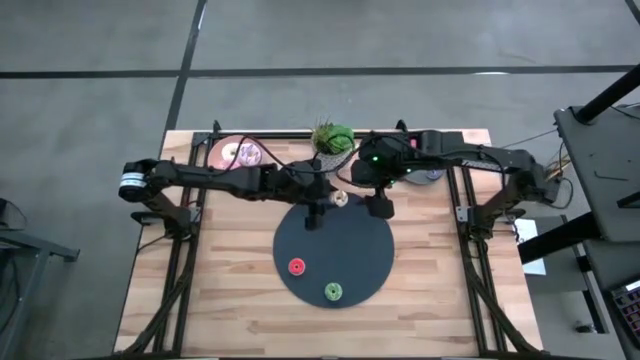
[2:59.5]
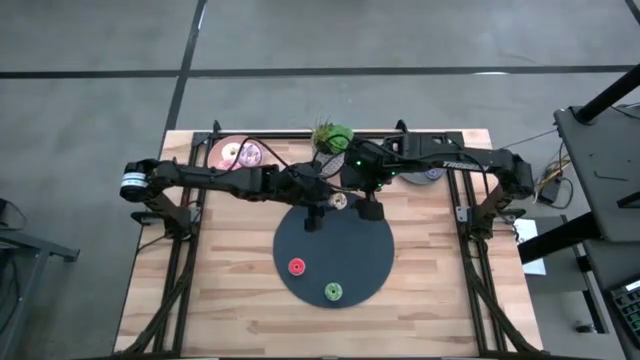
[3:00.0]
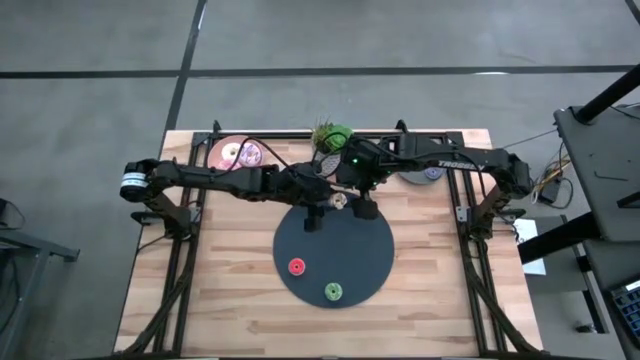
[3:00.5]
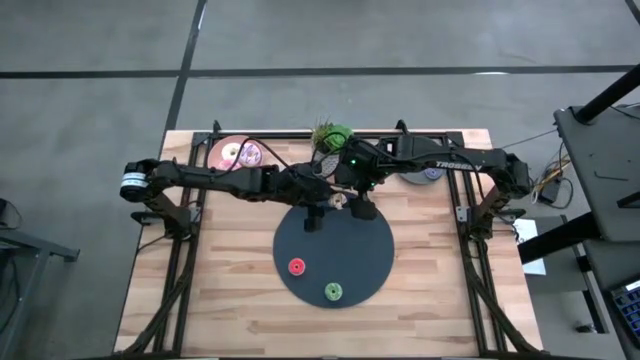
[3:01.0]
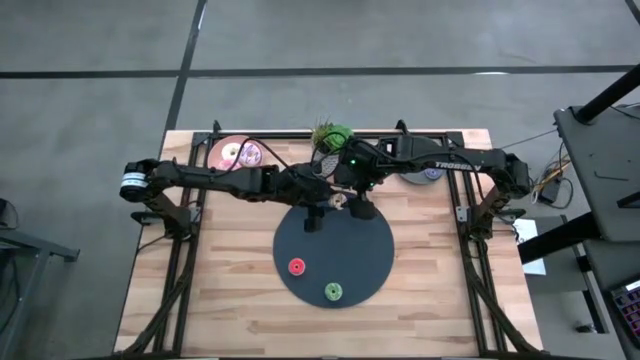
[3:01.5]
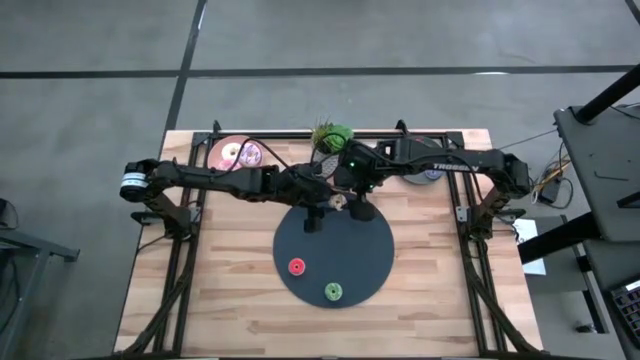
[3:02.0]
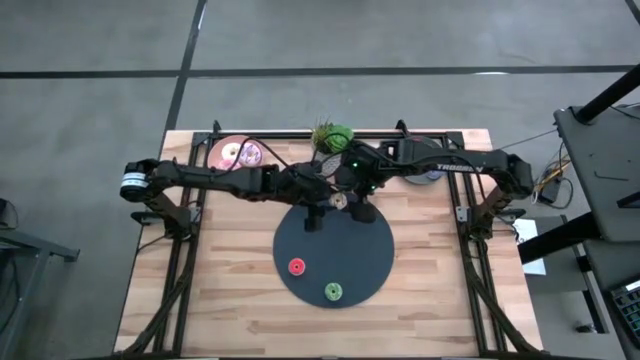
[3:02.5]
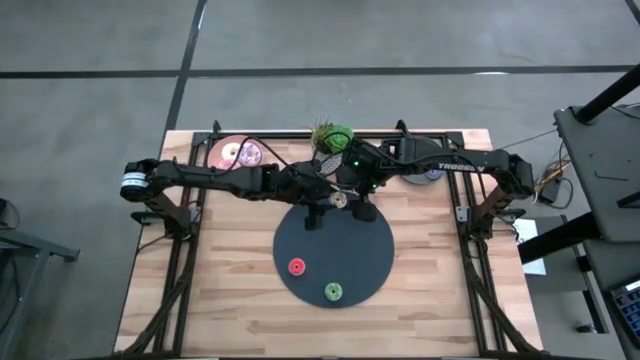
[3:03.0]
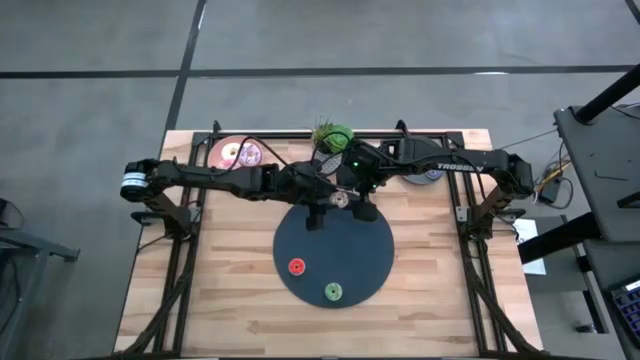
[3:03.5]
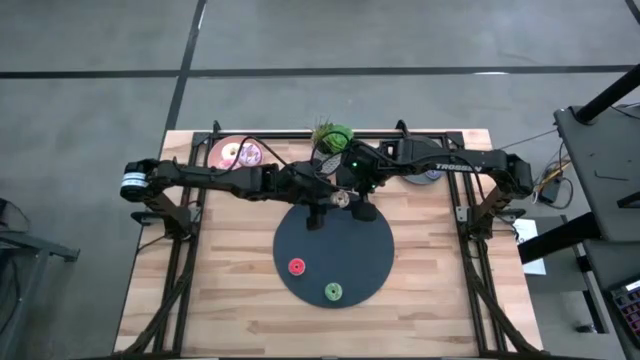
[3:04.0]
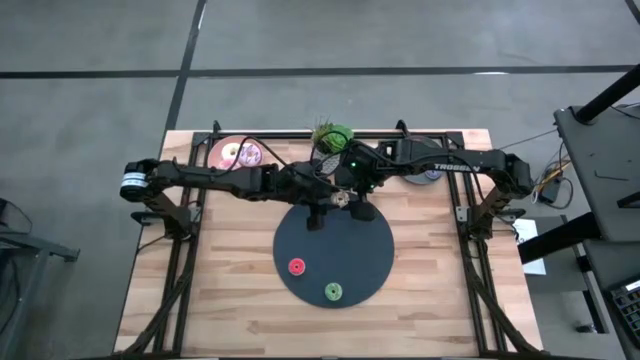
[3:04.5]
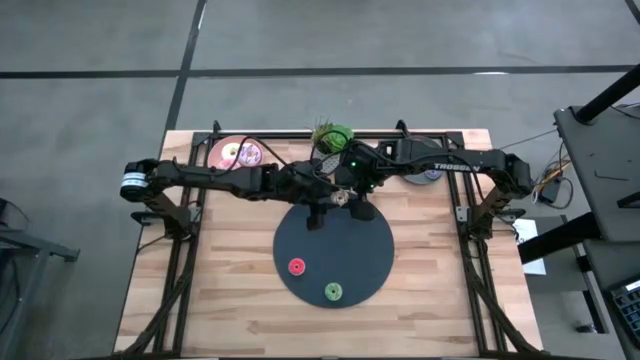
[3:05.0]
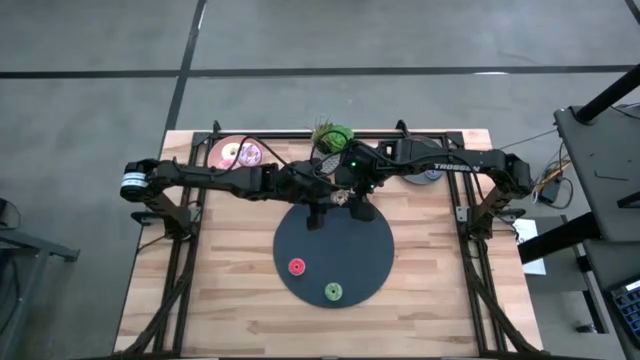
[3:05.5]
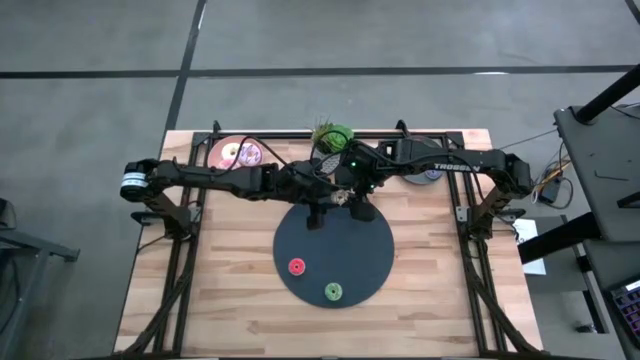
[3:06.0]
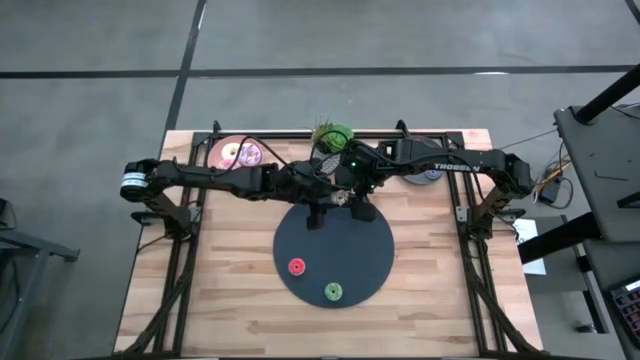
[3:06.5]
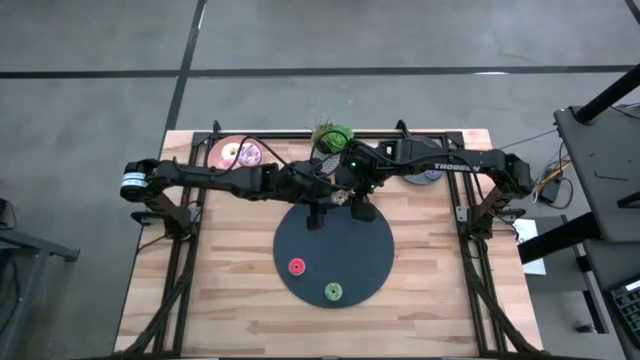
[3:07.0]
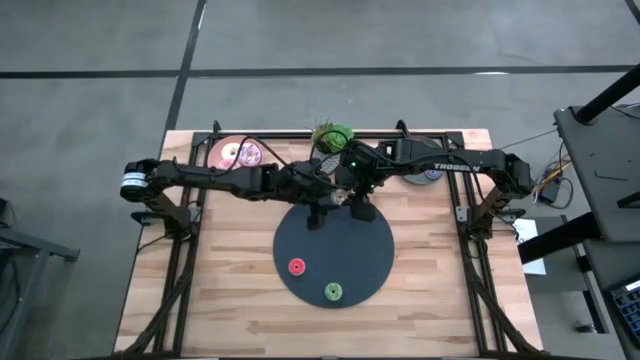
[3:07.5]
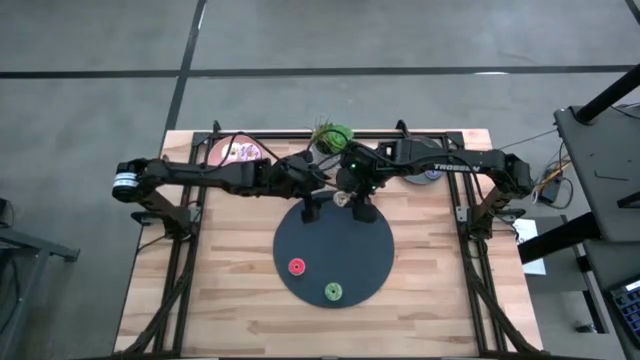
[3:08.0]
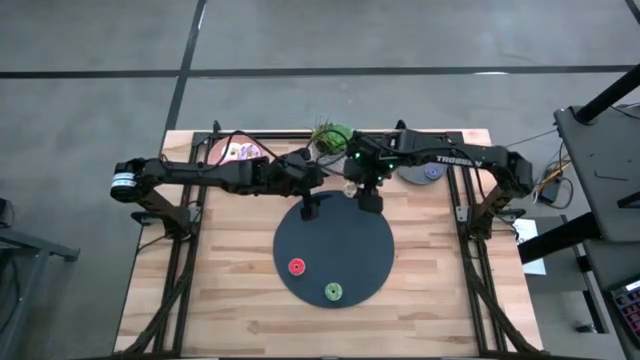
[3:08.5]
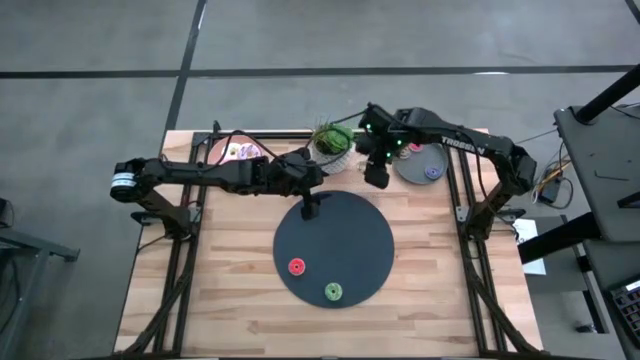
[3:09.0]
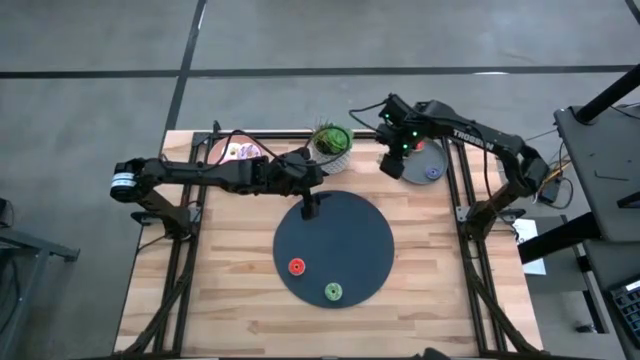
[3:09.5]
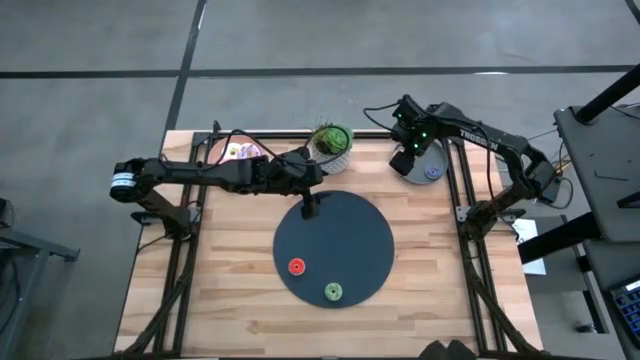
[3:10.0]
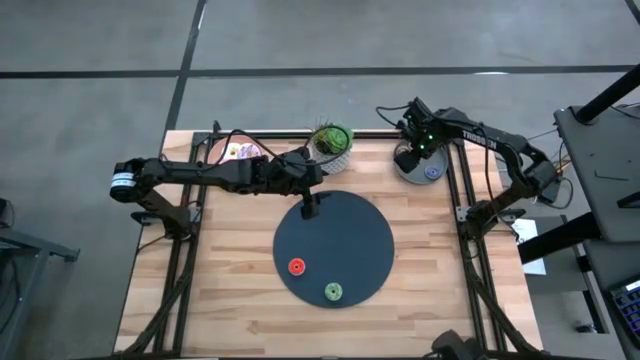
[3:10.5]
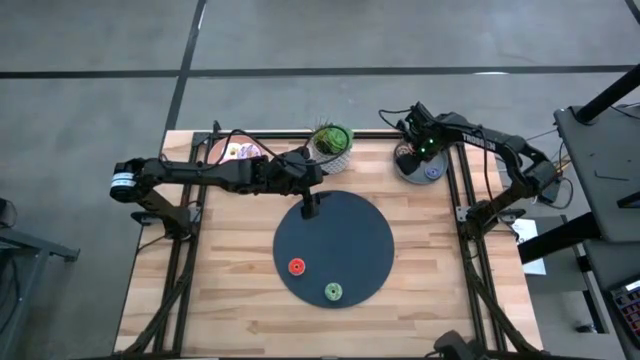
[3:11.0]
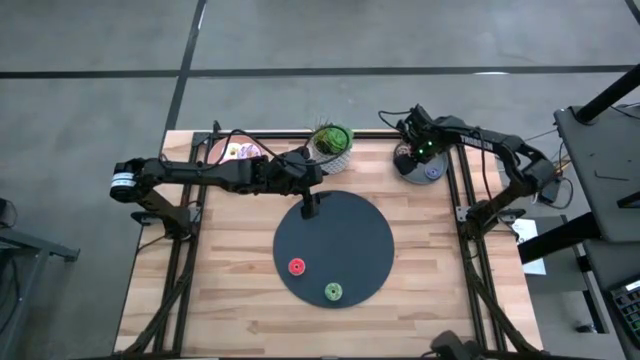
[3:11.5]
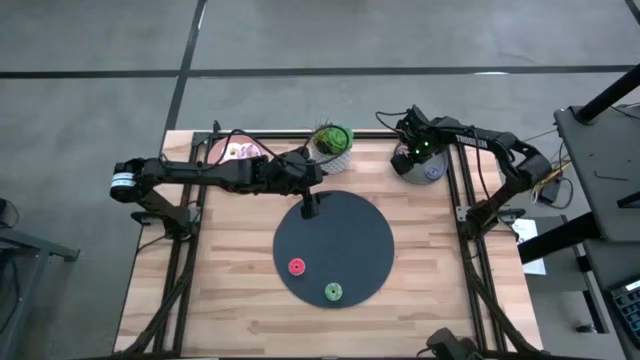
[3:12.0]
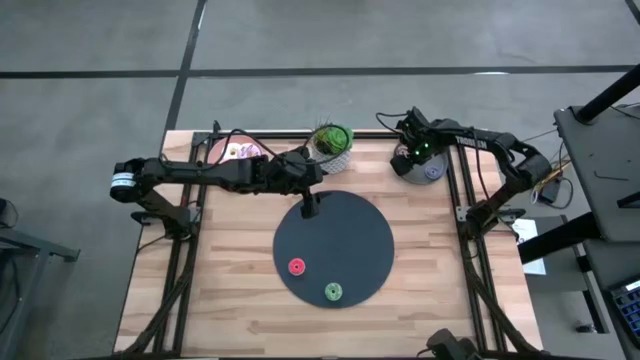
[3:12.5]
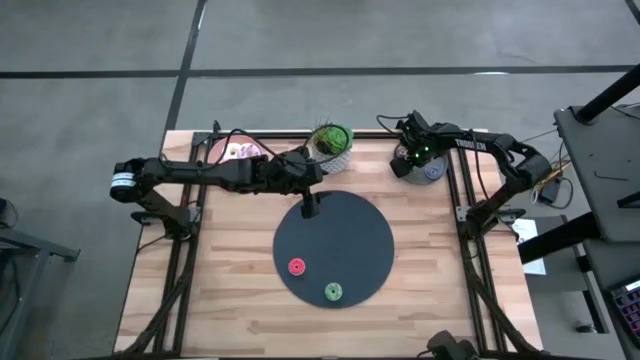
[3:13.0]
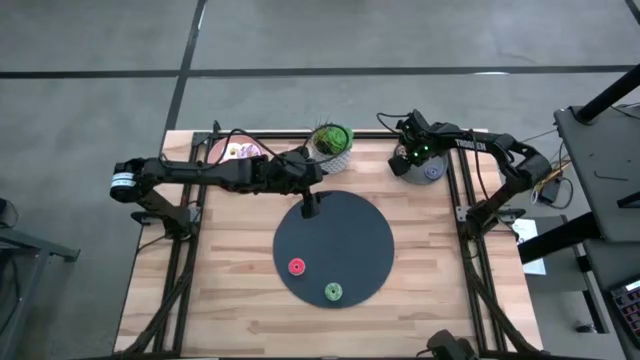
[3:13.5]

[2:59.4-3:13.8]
Task: Pick & Place donuts
Put the small white donut on the gray plate

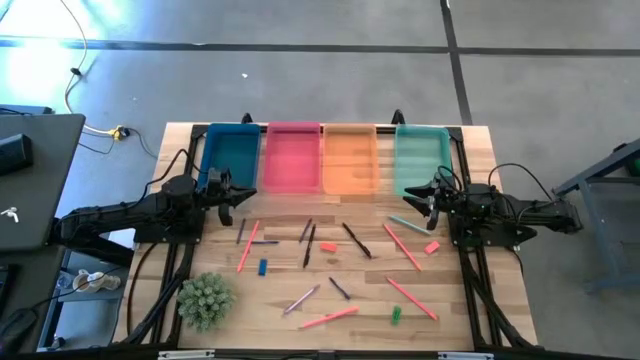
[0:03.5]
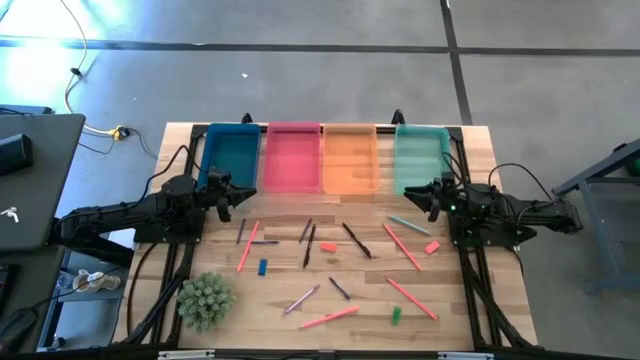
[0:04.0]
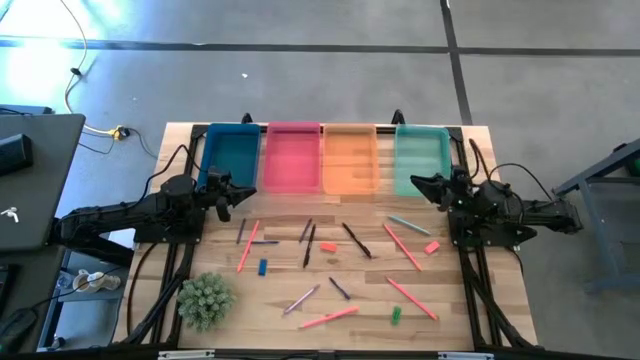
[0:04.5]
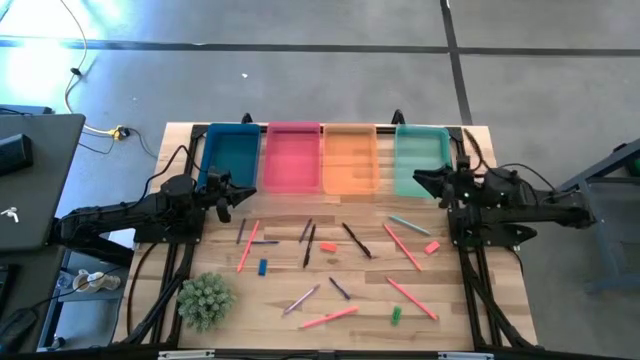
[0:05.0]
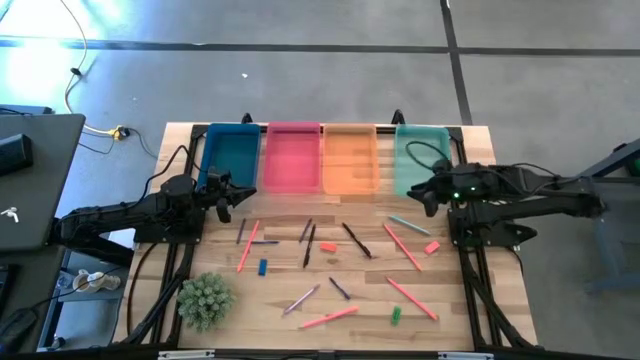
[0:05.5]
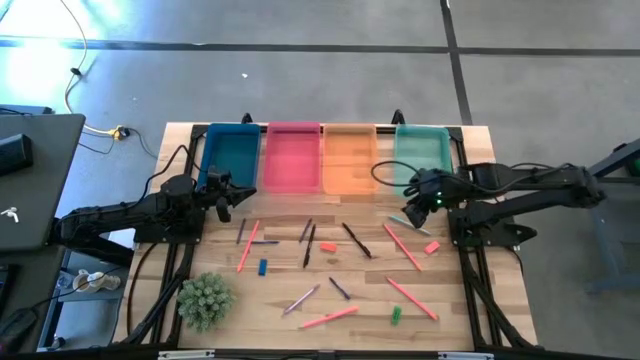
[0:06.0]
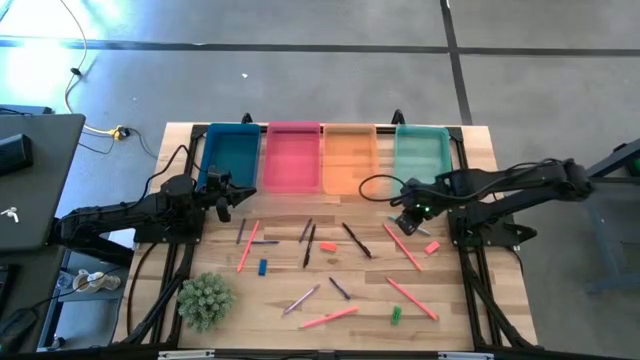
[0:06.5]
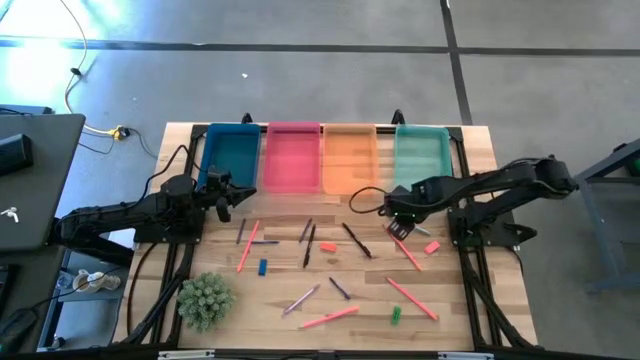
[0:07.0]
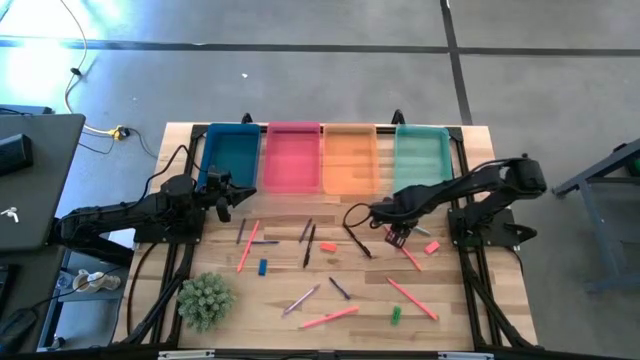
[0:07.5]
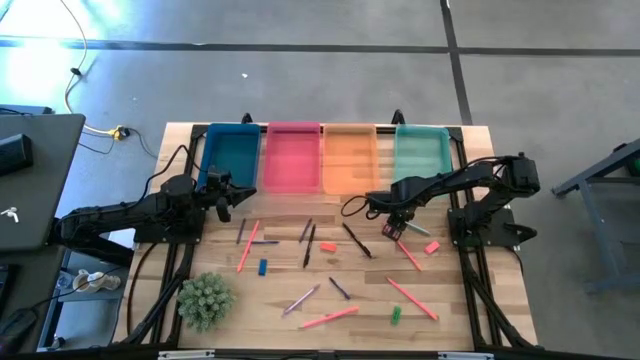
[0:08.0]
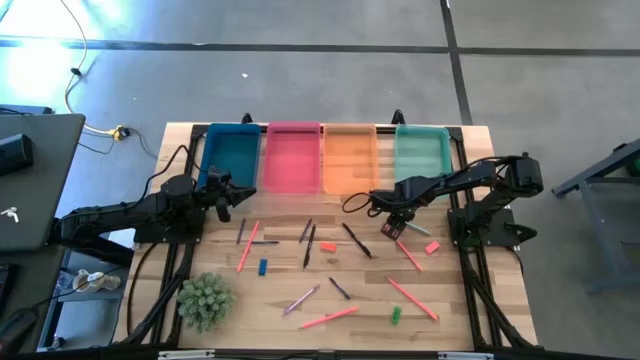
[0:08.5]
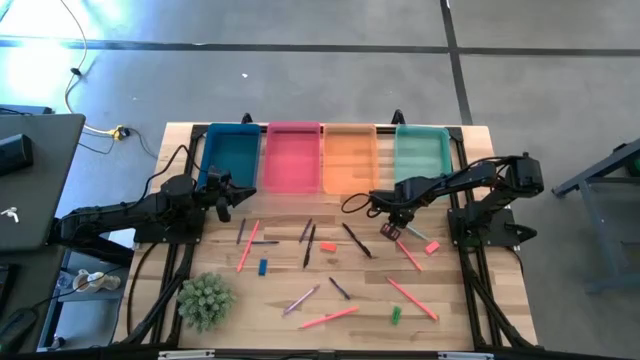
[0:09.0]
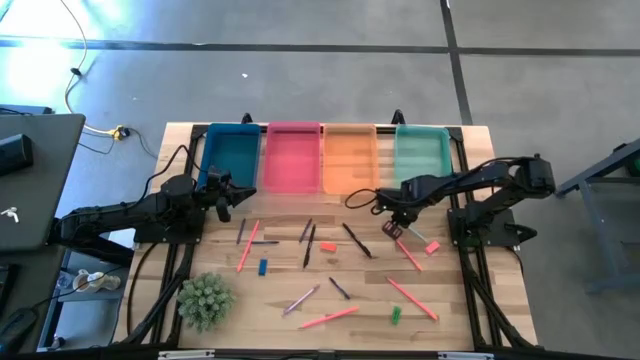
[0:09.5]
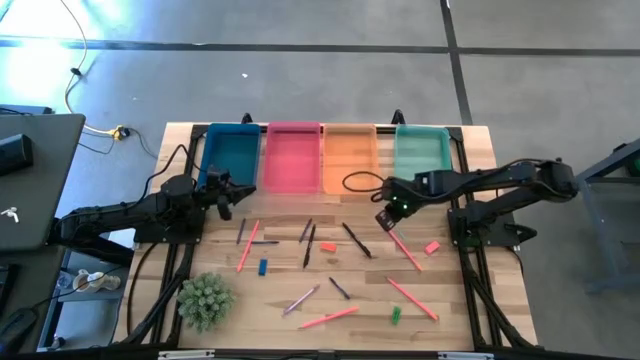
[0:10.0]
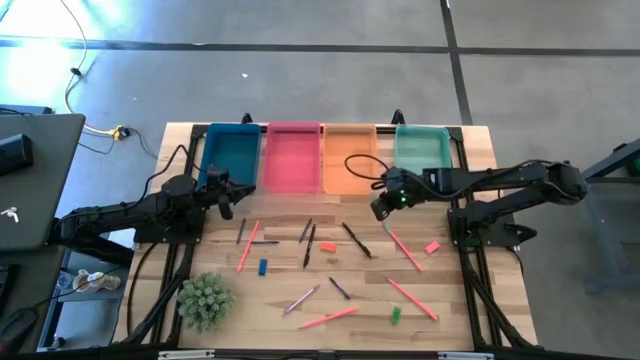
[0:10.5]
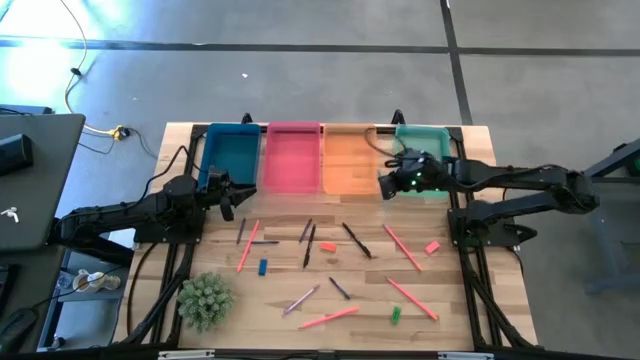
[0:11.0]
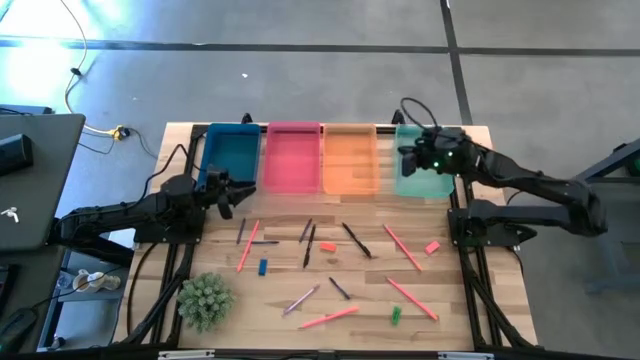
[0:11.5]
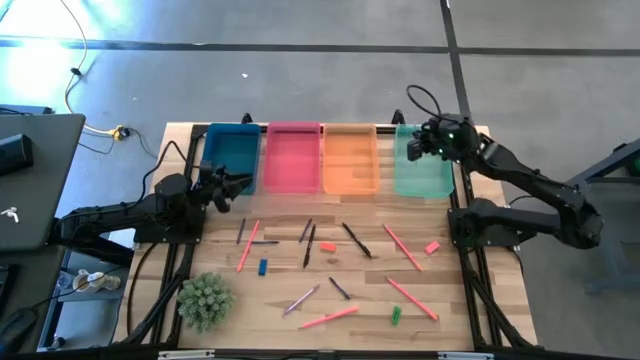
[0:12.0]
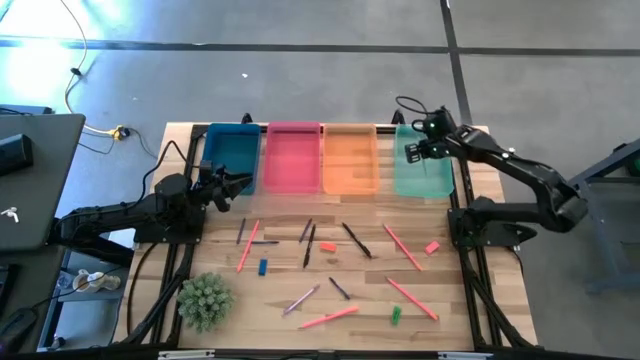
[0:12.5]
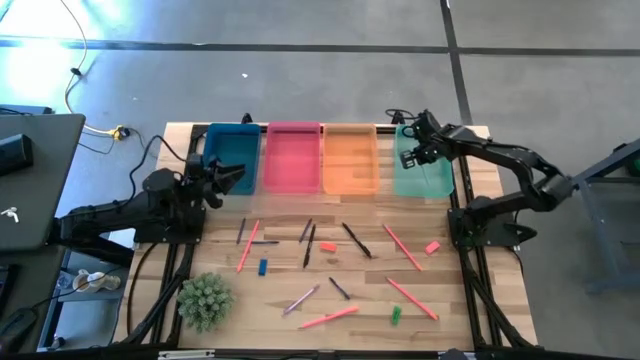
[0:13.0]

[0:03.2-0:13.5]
Task: Sort crayons/erasers/pens/pencils in bins
Put the blue pen into the green bin
